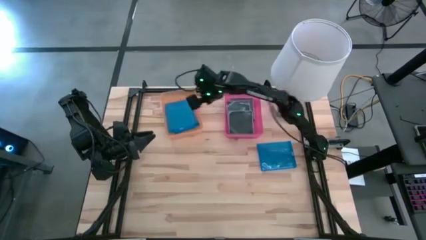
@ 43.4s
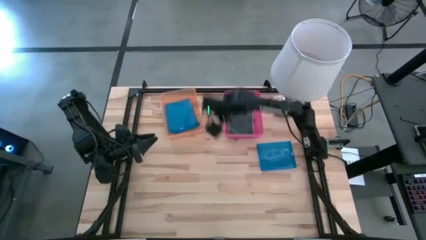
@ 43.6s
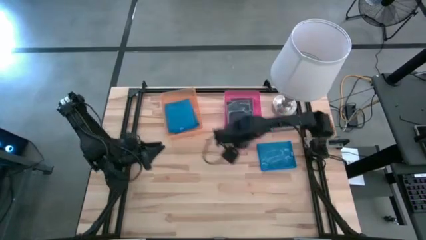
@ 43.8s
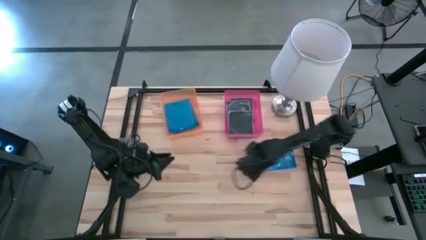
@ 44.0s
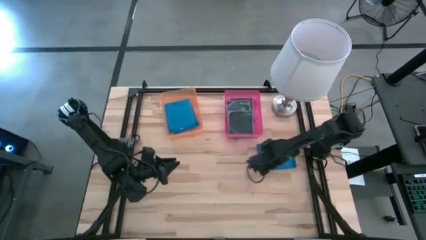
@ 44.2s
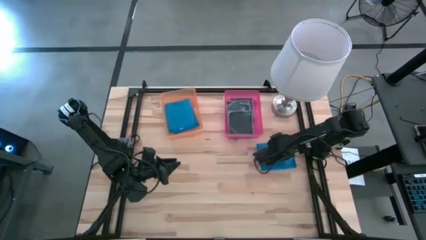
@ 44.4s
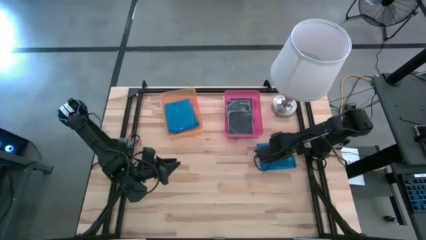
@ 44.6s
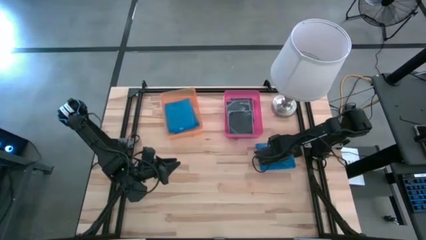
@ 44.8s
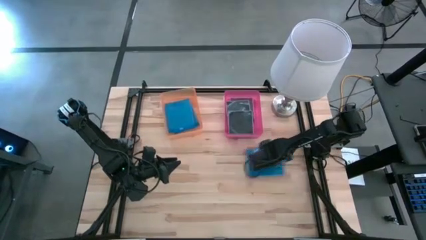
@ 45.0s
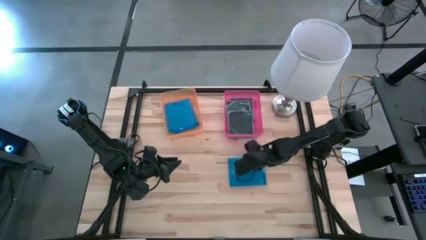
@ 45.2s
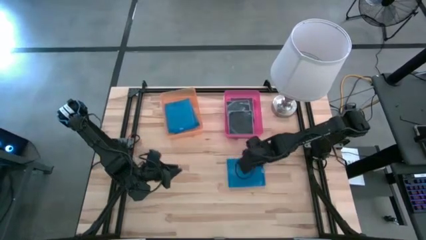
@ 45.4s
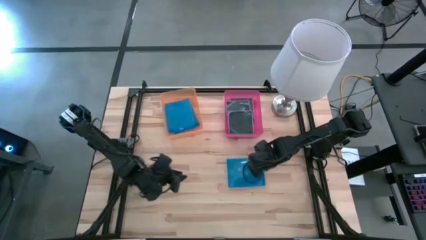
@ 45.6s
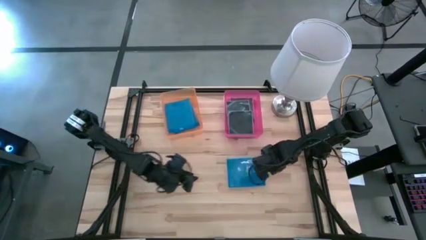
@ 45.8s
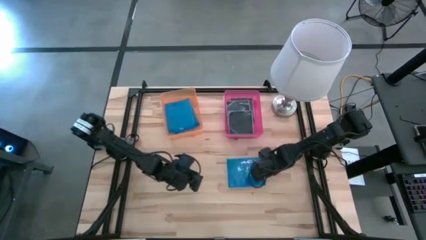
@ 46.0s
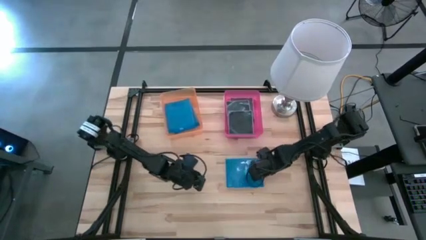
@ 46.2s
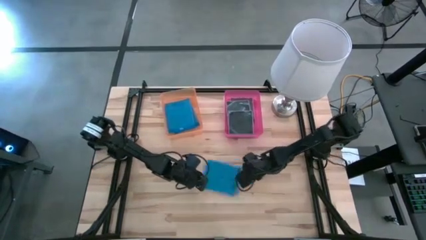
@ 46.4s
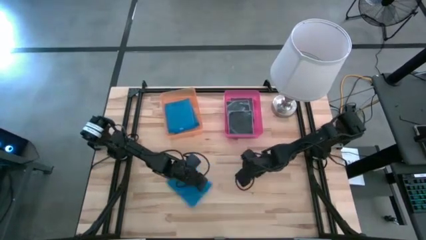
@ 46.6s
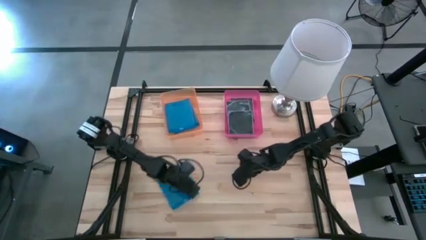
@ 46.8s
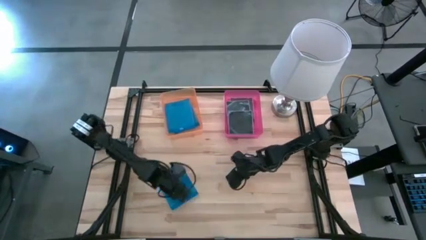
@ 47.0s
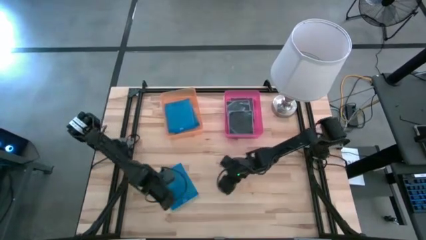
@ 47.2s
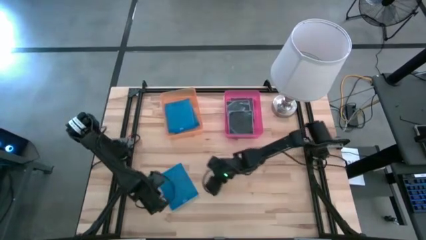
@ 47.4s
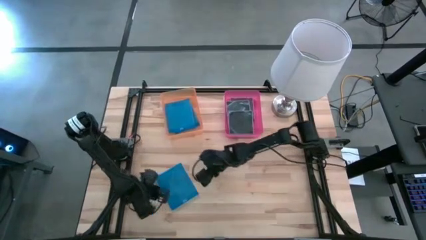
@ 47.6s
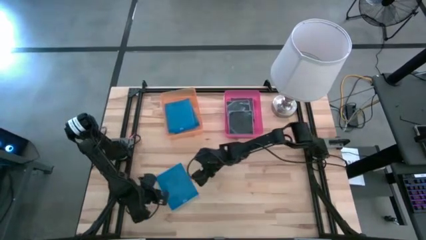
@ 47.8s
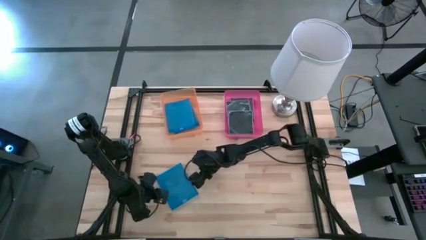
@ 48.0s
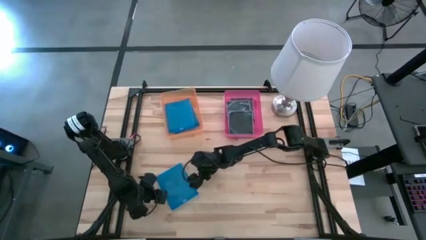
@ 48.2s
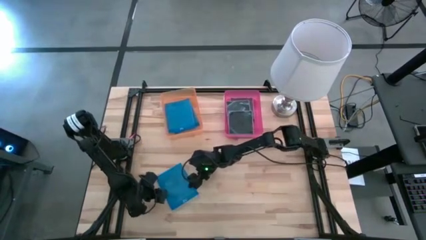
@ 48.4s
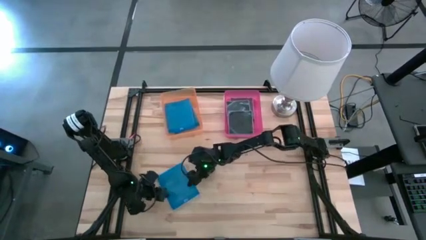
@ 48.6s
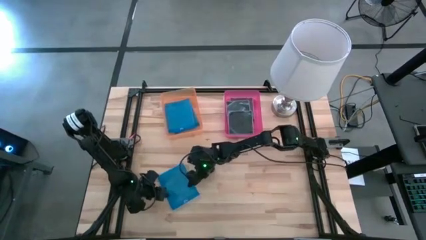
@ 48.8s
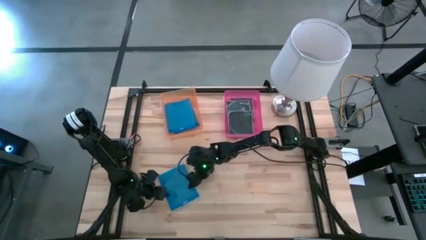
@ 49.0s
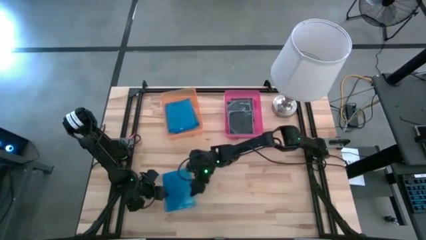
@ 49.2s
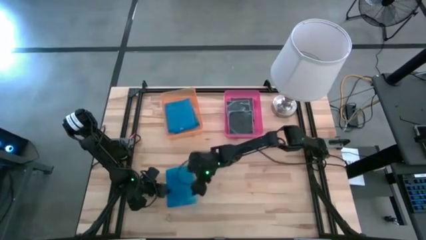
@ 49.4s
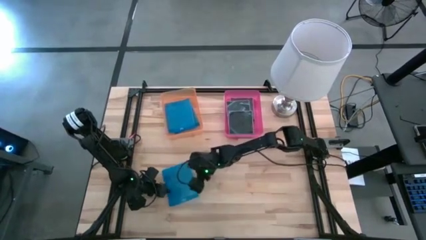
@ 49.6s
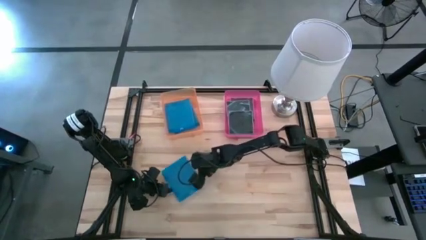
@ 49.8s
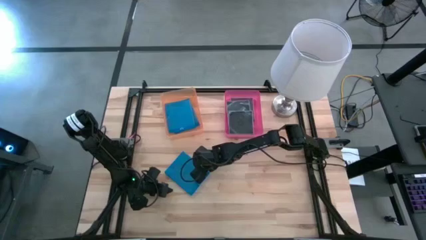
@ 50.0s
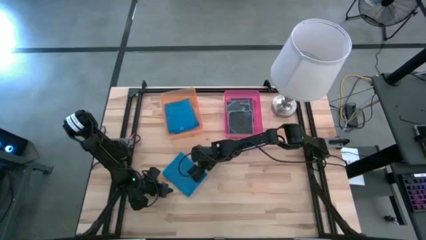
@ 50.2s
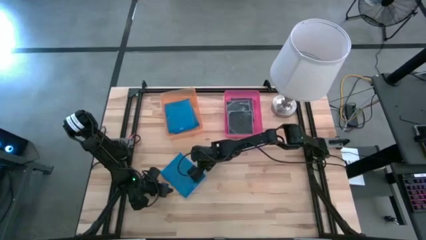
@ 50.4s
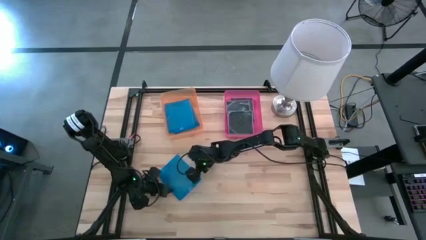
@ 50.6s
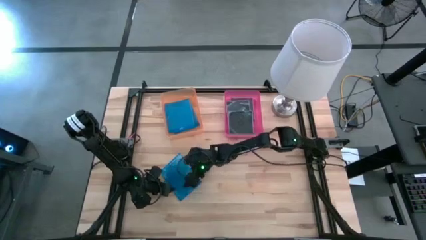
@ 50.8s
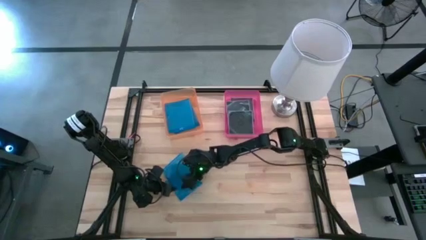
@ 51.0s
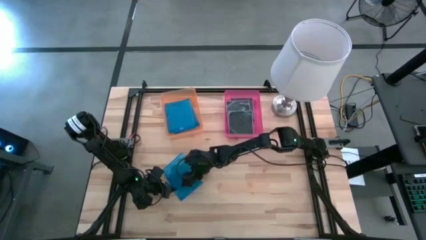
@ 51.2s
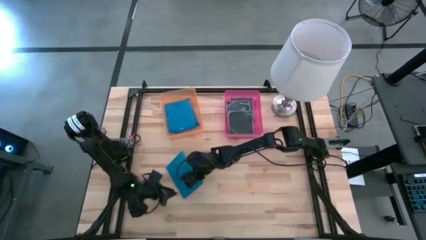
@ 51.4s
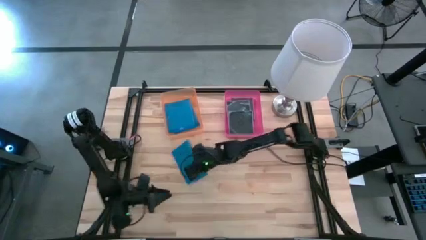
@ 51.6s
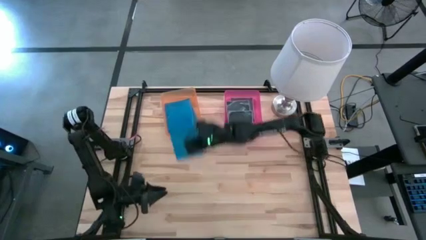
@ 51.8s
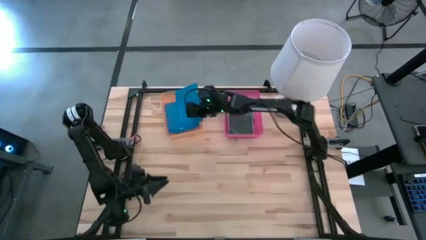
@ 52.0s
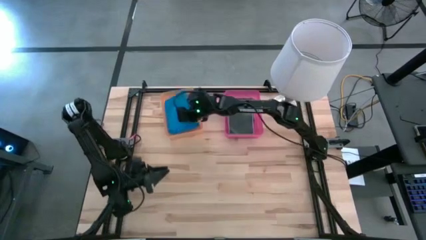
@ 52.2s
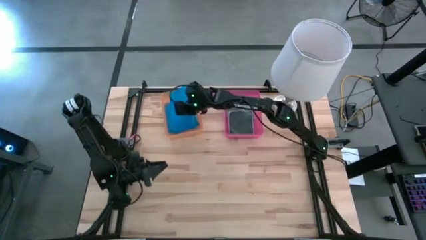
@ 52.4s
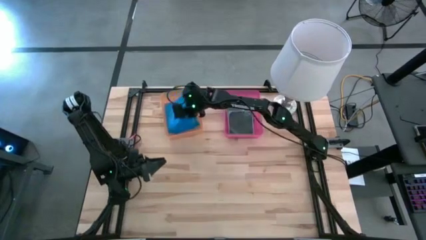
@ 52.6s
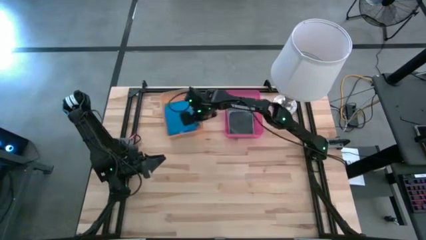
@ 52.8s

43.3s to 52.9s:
Task: Pick & place jewel cases by type
Put the blue CD case into the orange bin

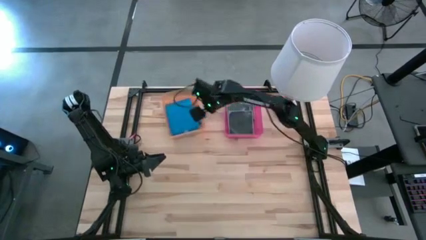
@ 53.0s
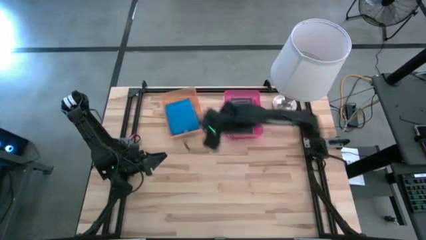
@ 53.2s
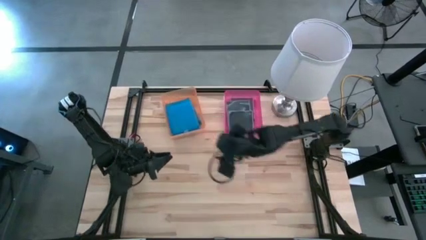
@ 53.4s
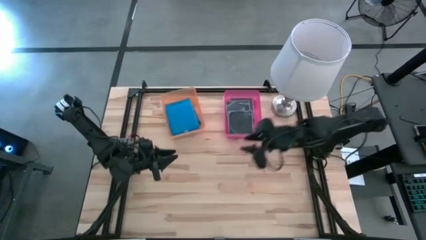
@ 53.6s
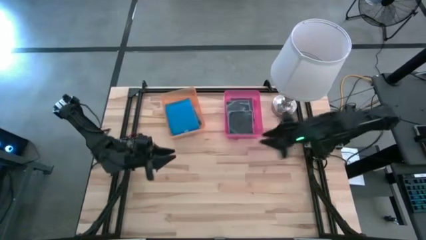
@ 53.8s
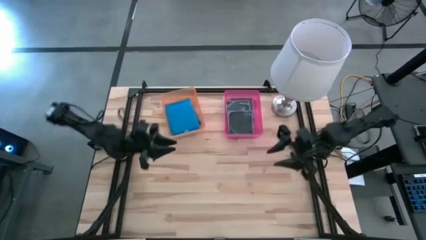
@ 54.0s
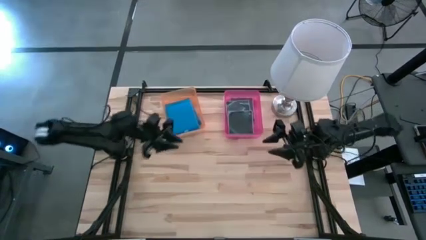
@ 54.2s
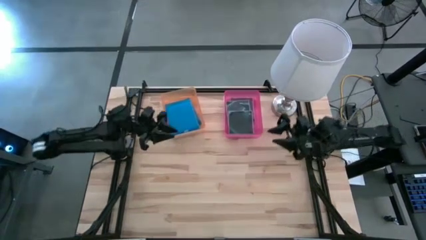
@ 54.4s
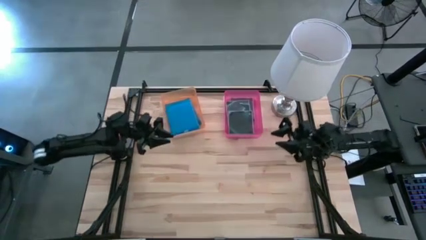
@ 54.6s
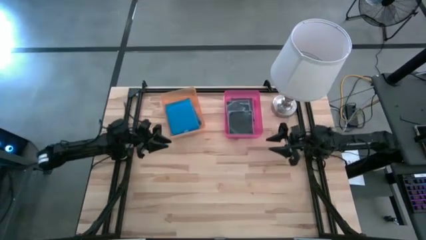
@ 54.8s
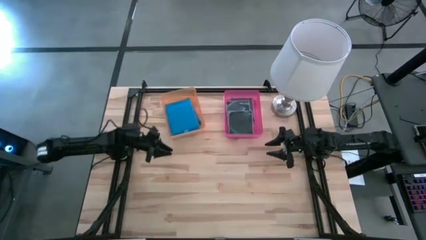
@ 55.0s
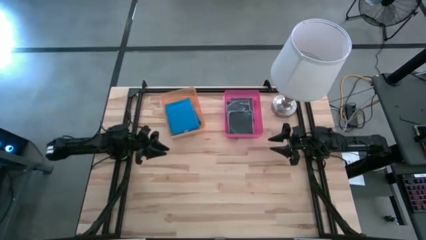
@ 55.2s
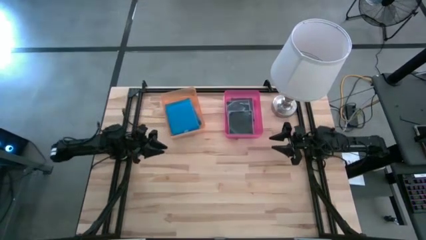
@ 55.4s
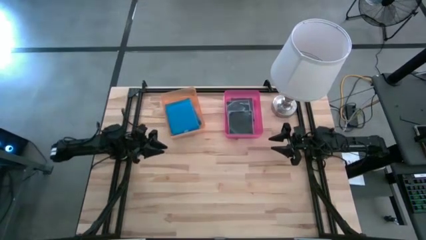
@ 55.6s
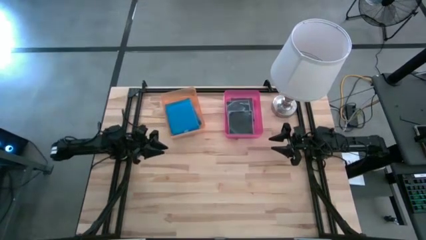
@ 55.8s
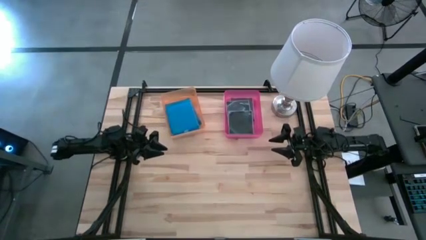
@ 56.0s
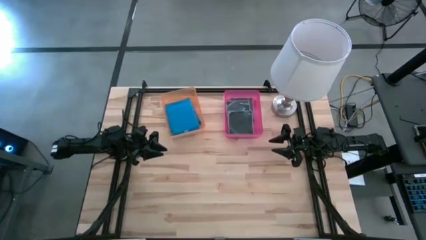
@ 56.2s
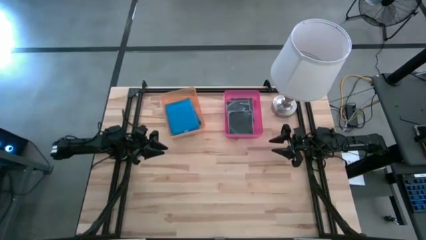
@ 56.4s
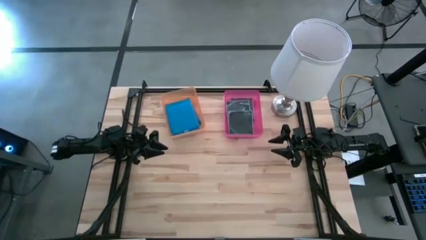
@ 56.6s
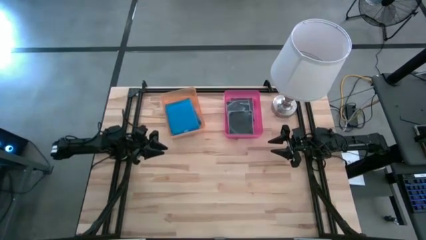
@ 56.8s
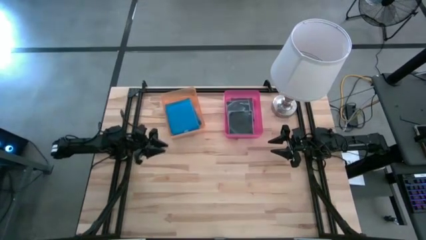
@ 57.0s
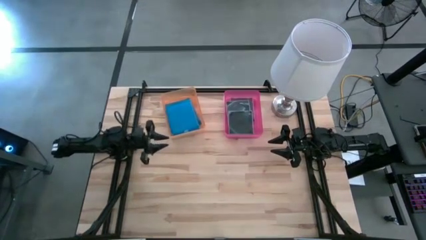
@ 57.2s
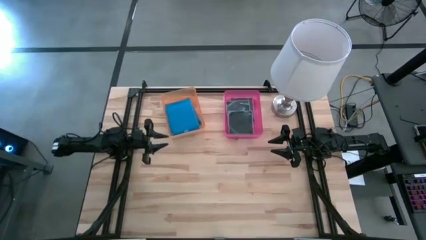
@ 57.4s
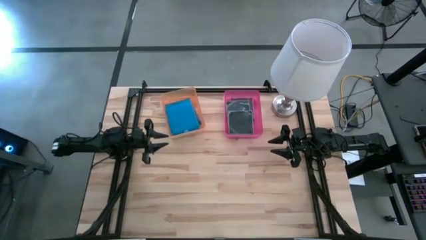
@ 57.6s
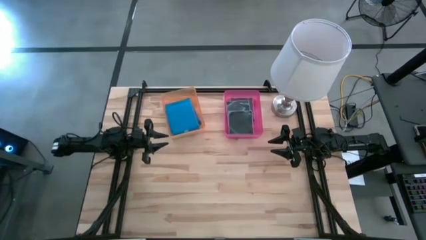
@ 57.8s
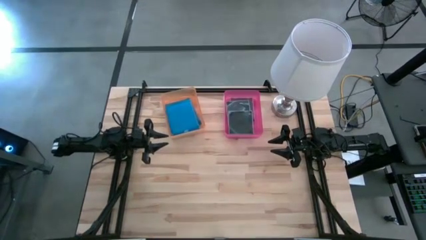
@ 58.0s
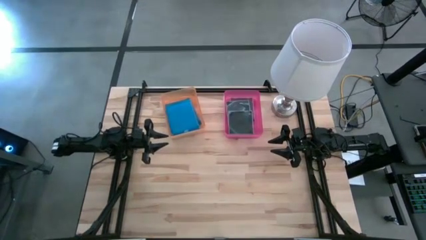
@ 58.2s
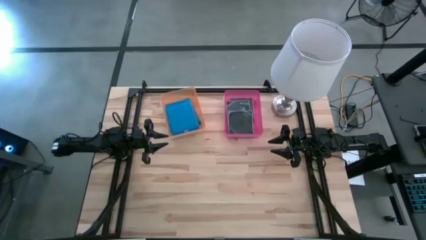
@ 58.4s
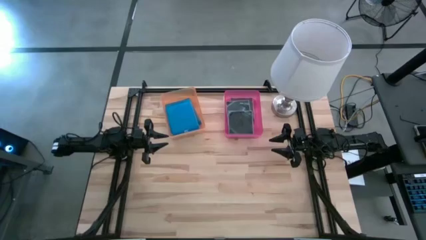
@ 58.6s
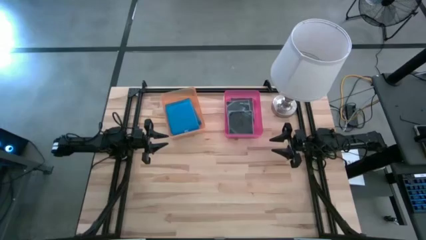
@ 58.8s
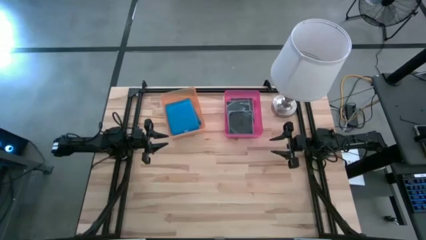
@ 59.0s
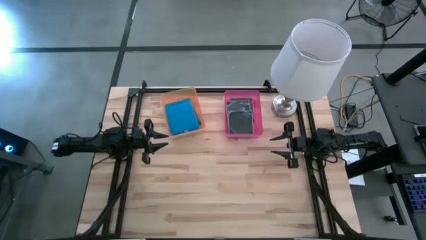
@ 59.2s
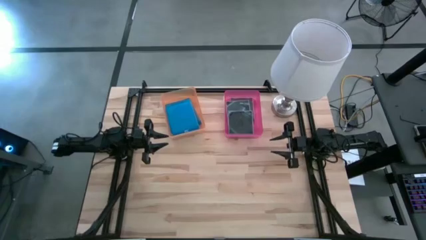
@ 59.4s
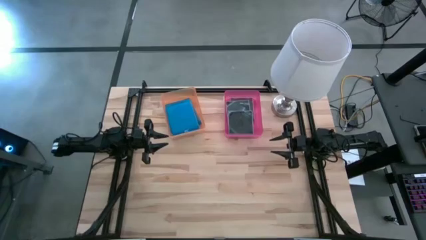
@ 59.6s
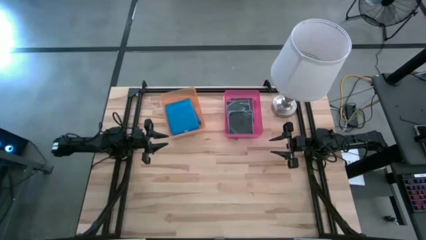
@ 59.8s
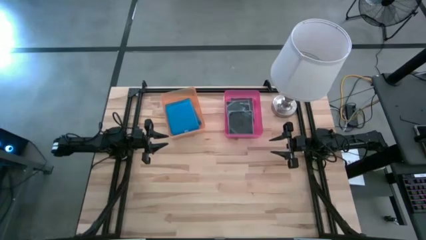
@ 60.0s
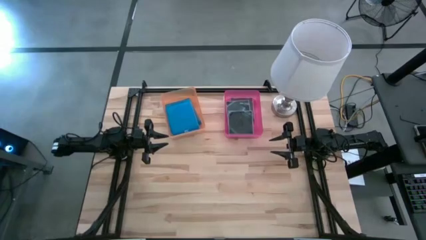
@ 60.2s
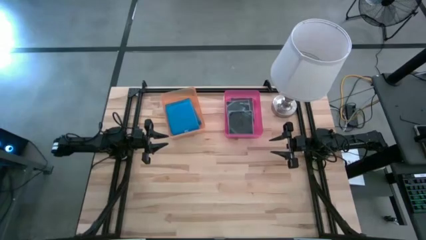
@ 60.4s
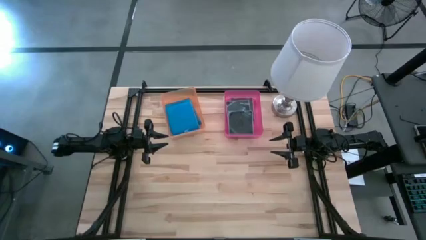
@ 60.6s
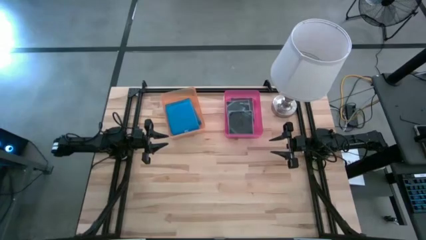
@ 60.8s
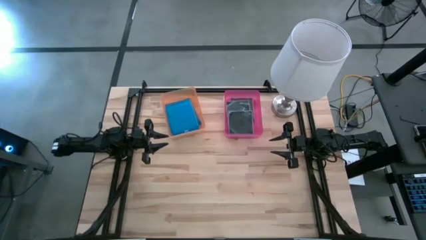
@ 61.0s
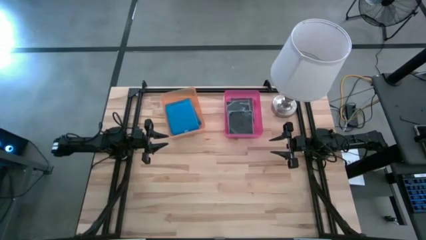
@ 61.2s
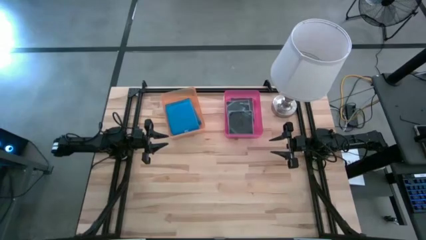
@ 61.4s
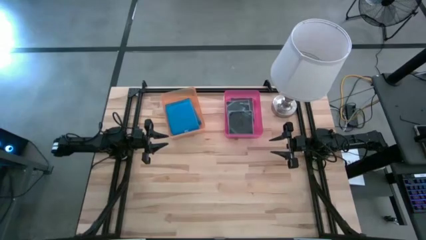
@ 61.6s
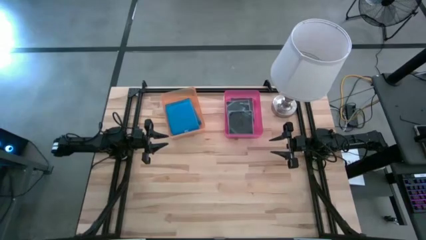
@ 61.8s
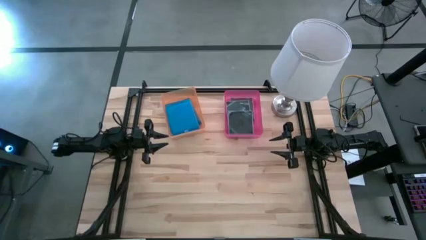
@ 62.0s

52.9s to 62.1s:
Return to Home Position
